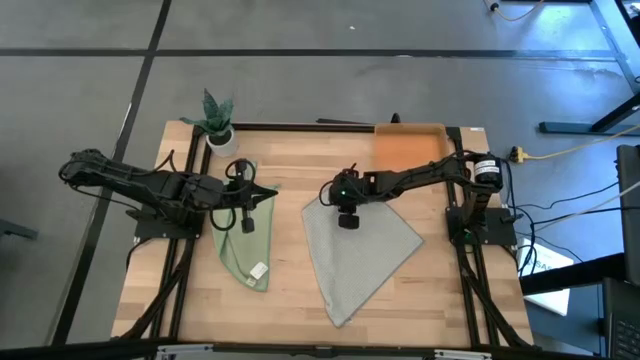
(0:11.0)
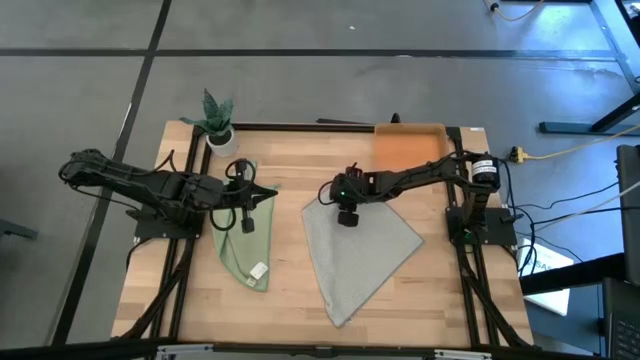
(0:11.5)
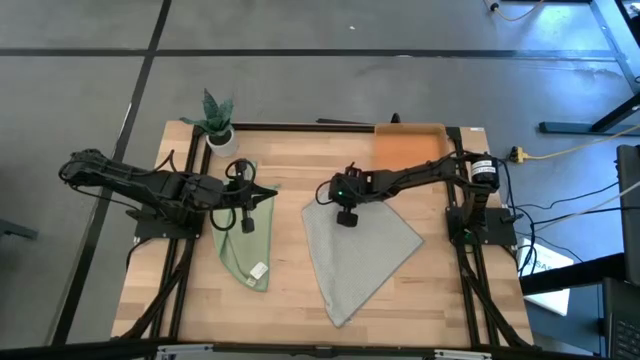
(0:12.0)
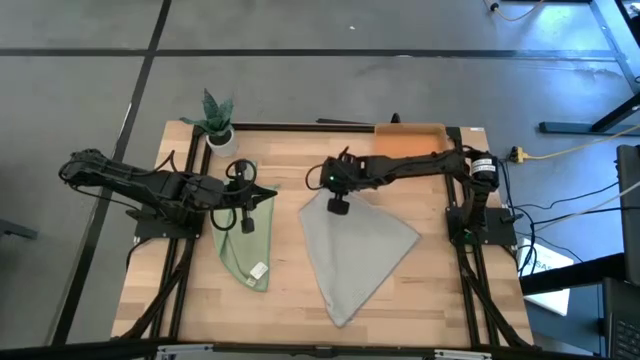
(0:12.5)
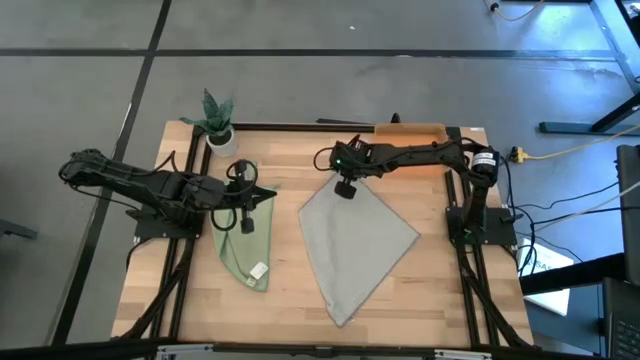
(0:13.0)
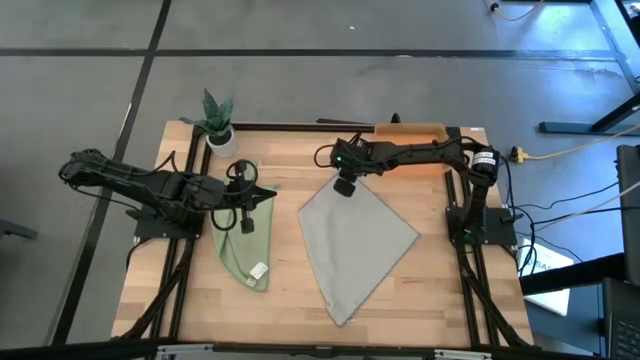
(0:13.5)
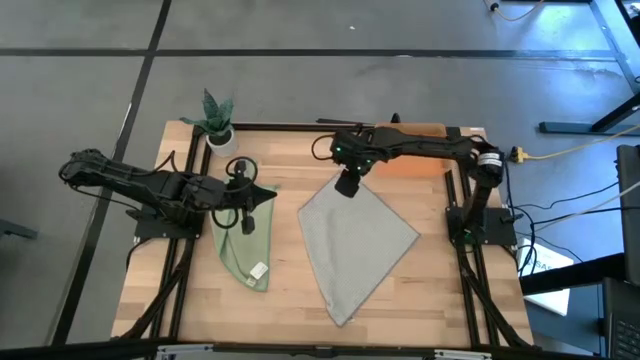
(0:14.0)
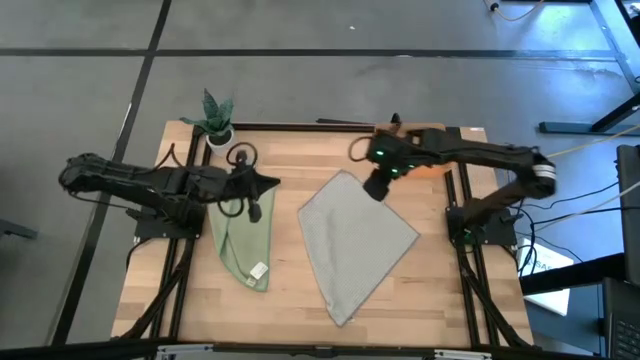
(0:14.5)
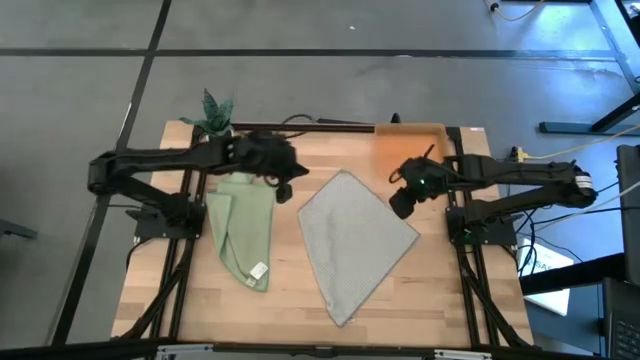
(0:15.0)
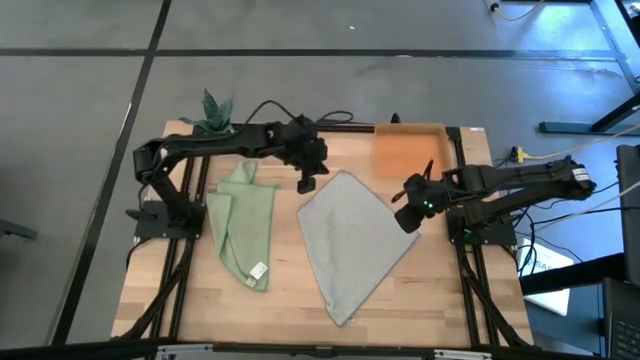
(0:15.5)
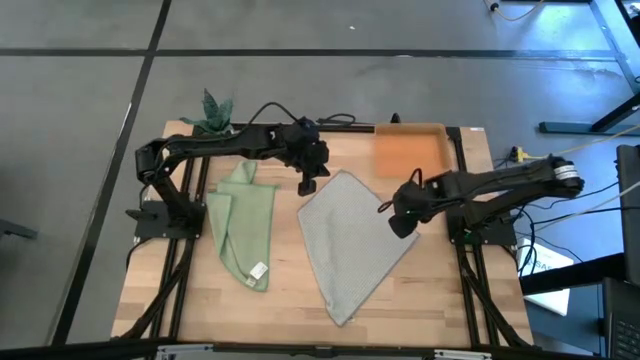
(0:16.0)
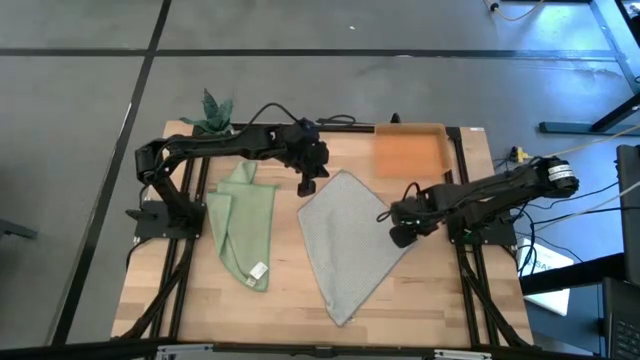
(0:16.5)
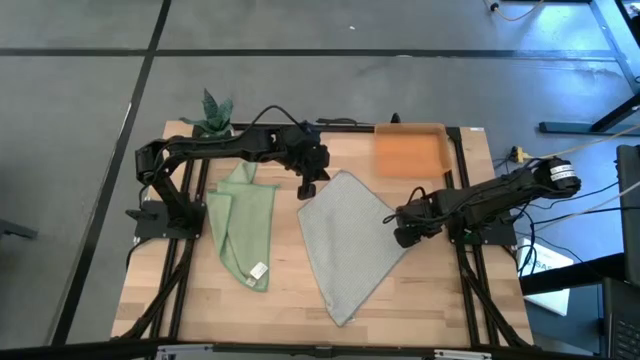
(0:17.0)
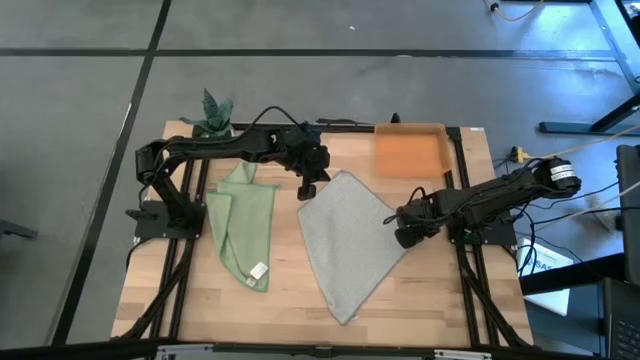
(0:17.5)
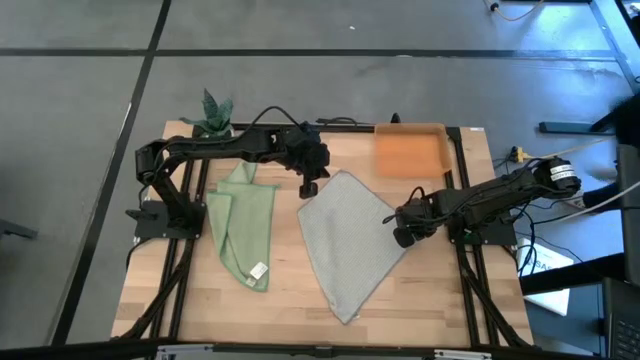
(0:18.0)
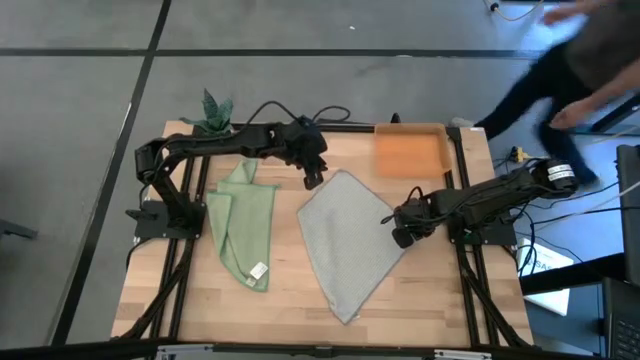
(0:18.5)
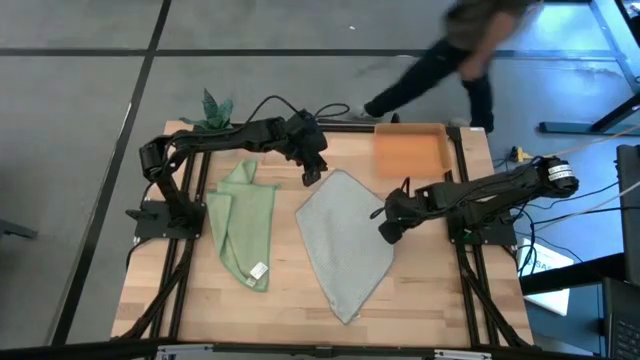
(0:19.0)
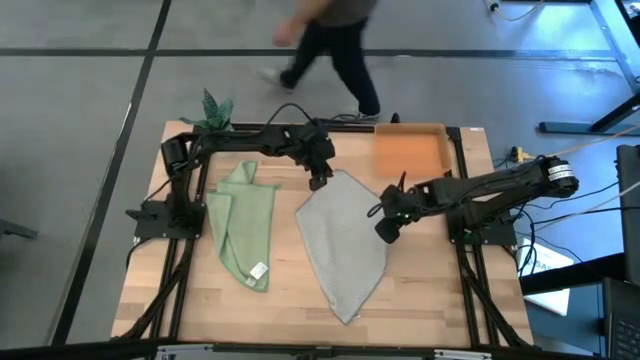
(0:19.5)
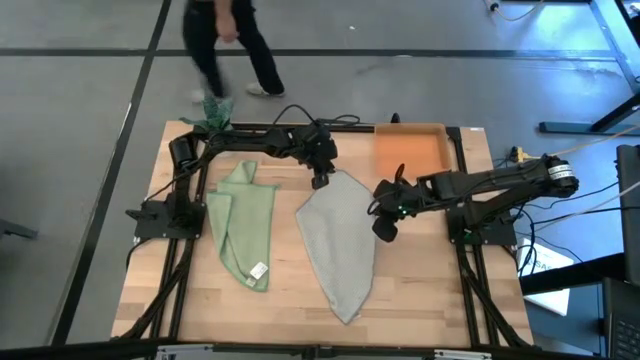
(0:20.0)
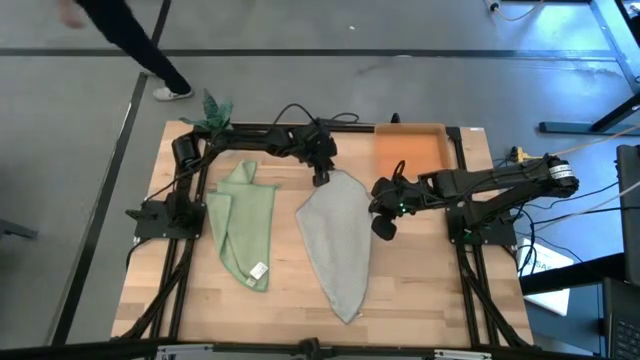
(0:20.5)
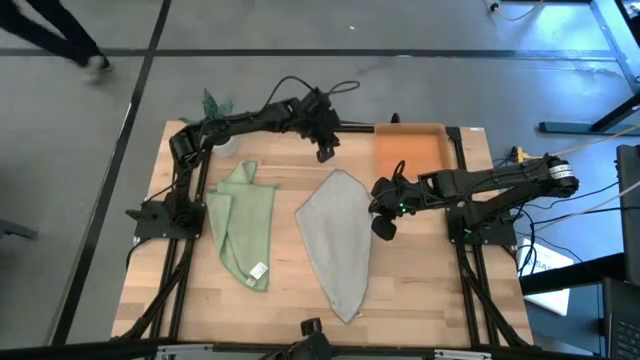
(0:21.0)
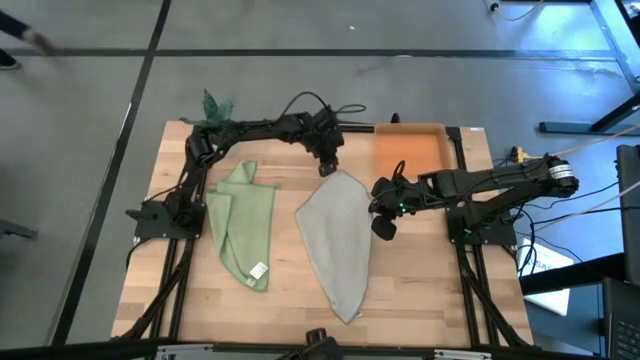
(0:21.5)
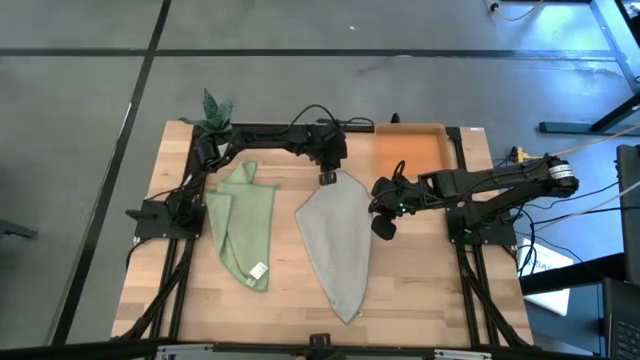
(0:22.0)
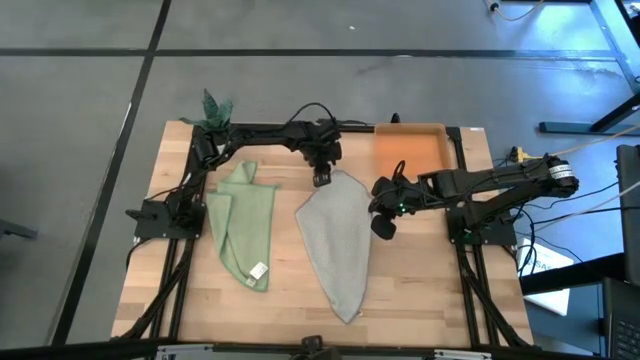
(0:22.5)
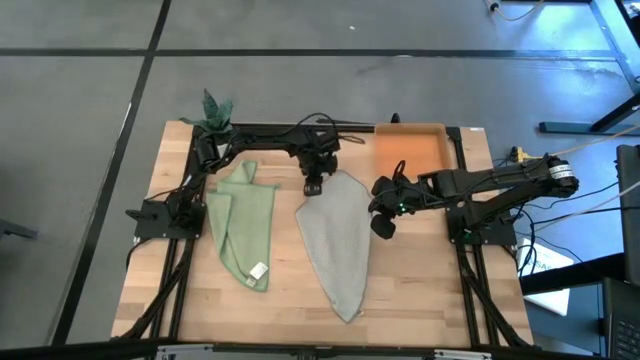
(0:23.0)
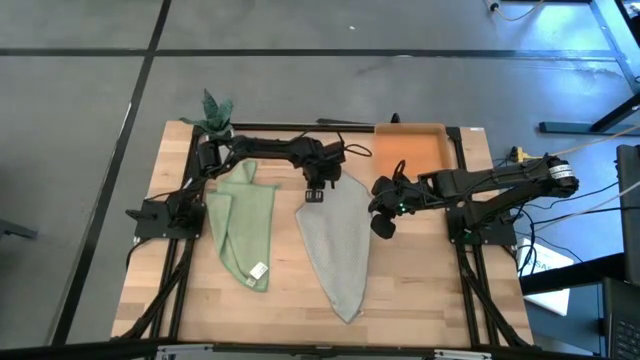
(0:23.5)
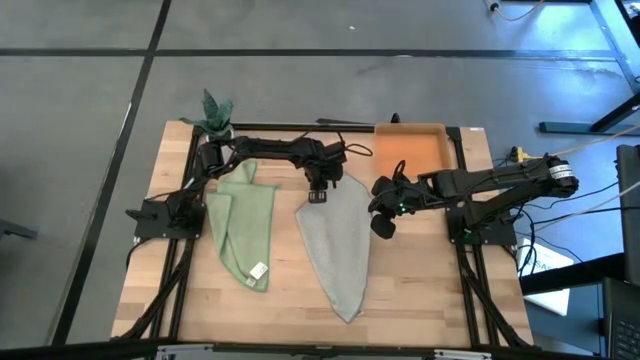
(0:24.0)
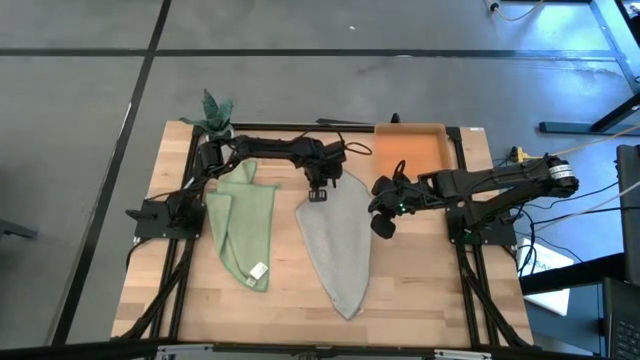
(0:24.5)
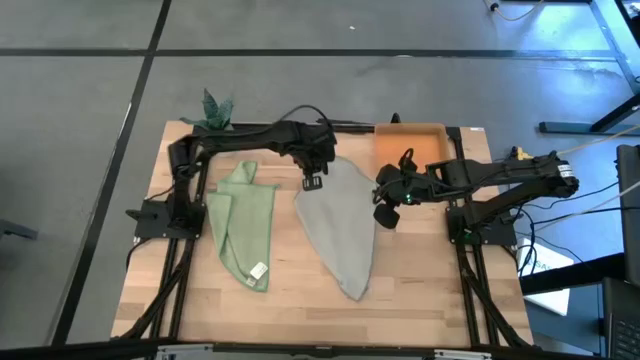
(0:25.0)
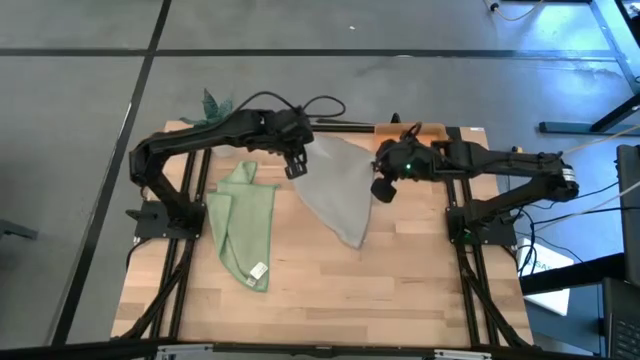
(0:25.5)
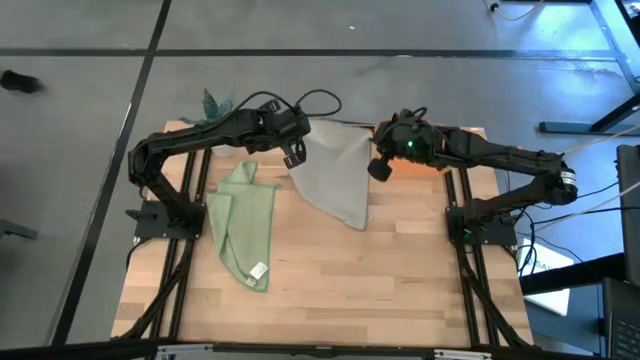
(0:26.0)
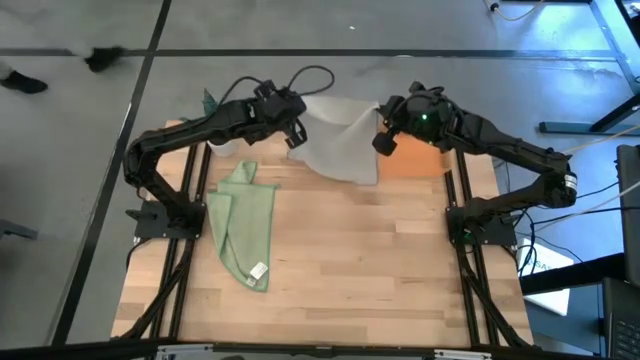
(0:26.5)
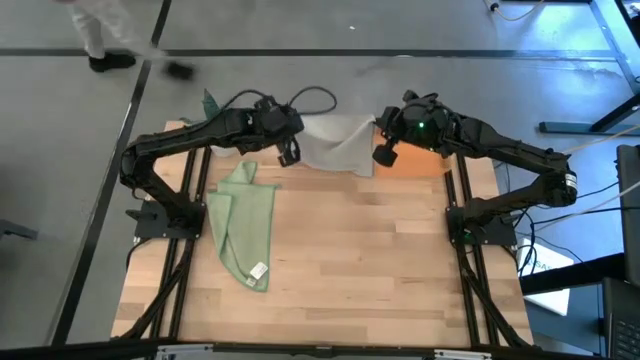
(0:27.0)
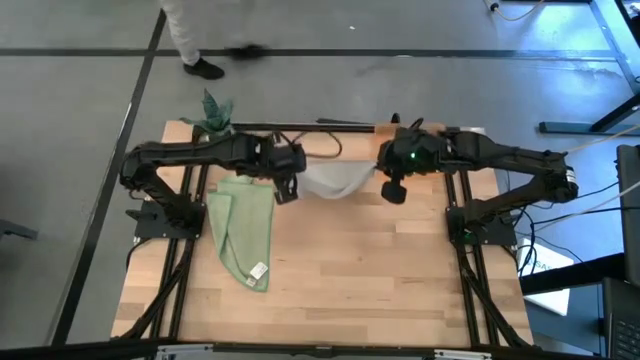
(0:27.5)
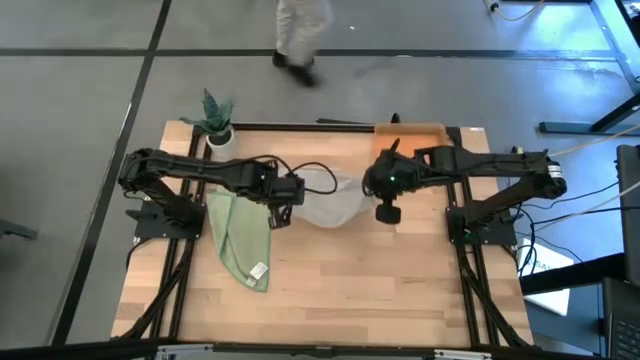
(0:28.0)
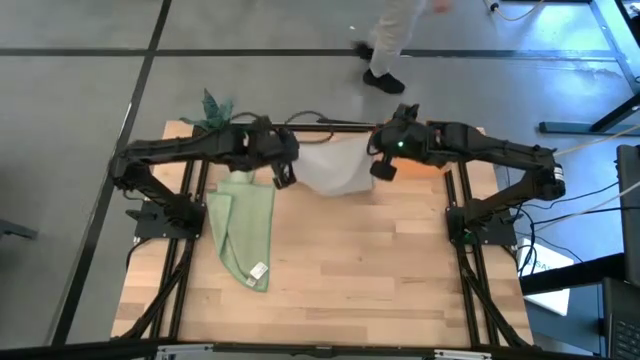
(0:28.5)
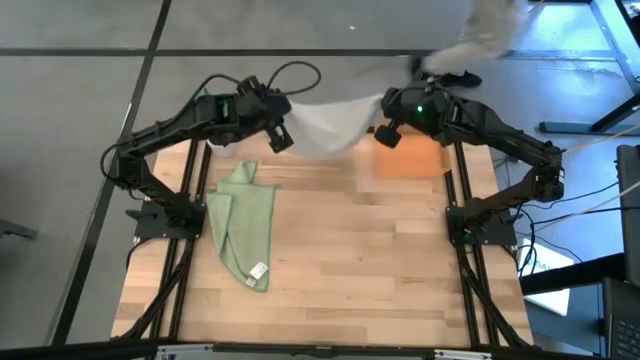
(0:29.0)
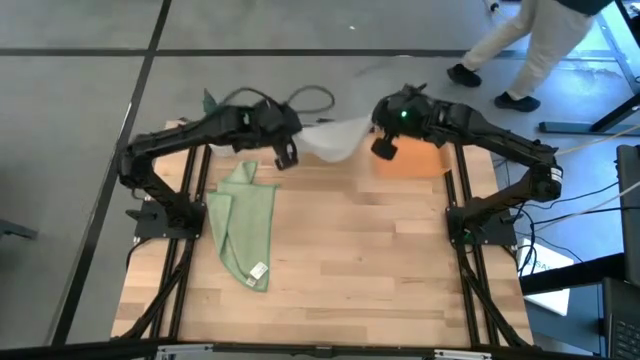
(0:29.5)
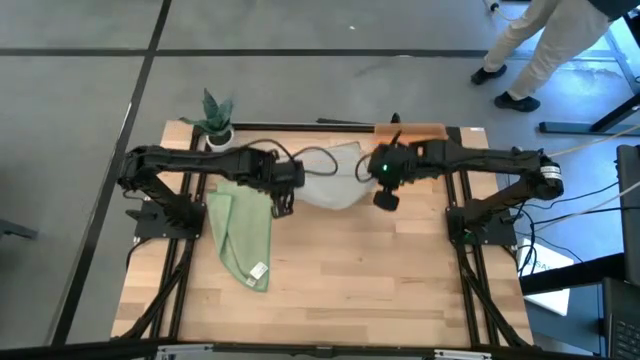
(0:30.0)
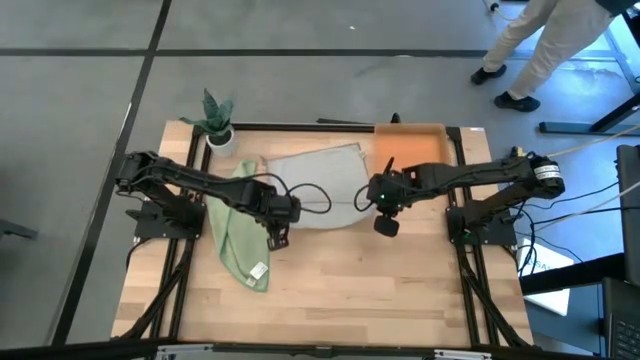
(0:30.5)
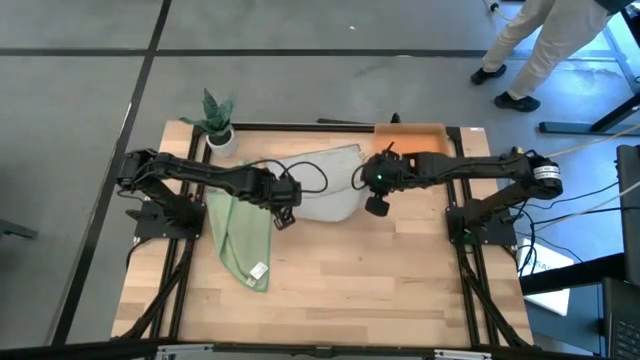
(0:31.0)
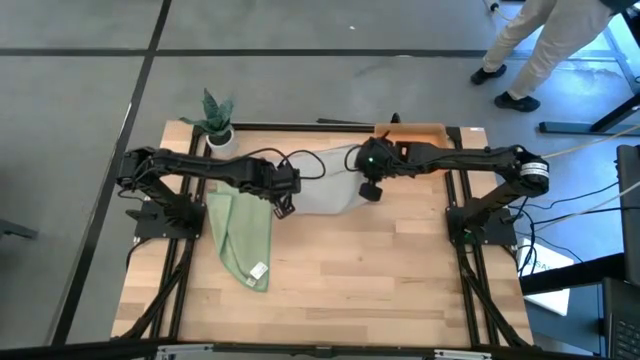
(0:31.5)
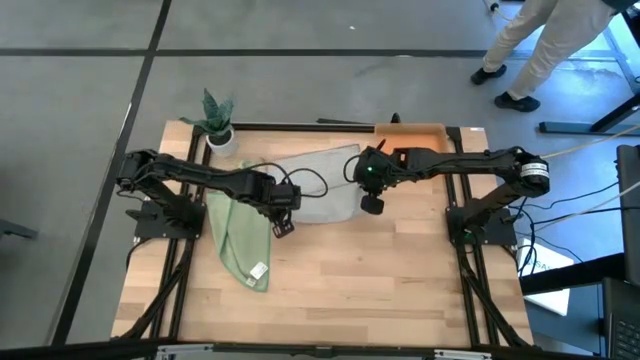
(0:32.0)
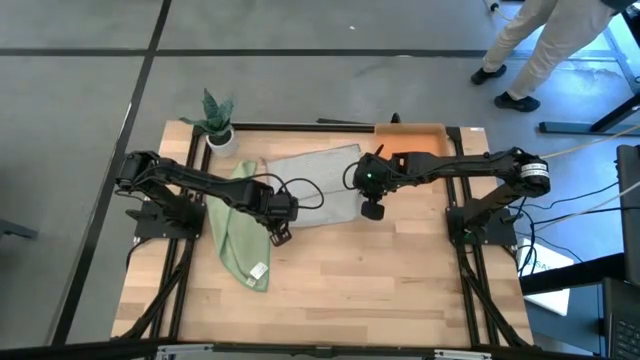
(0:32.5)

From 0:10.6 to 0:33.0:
Task: Roll microfiber towels into tight, uniform cylinder then place into a basket
Fold the gray microfiber towel
